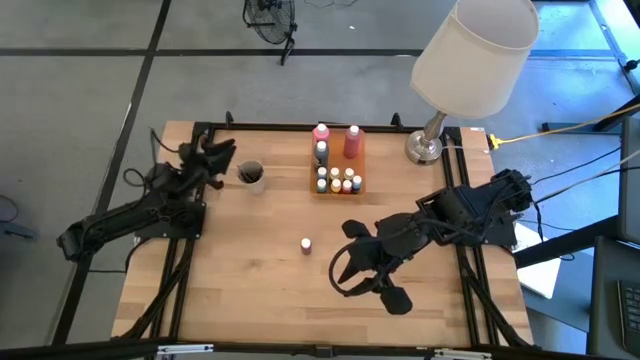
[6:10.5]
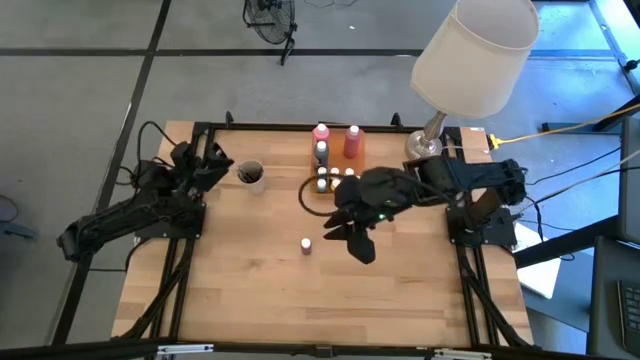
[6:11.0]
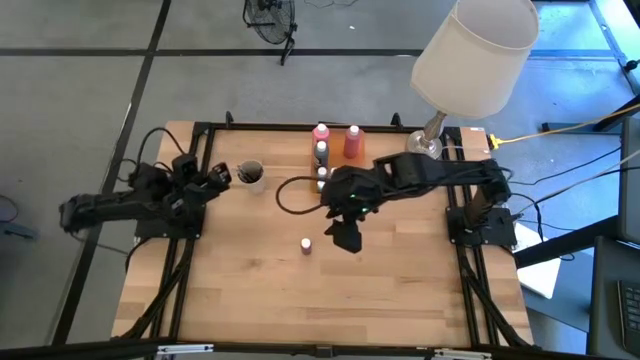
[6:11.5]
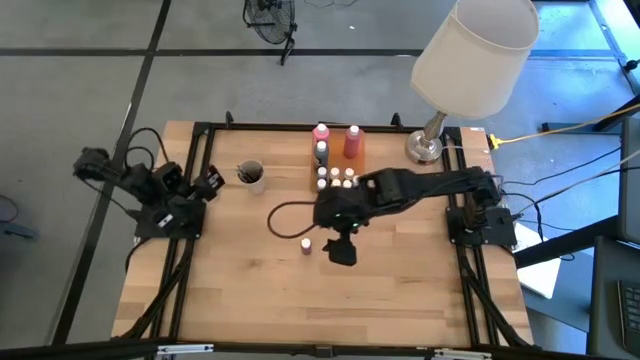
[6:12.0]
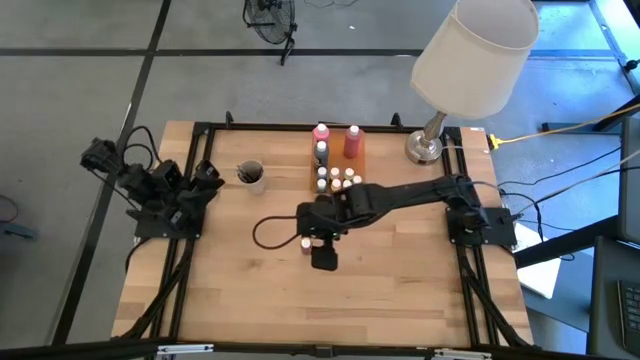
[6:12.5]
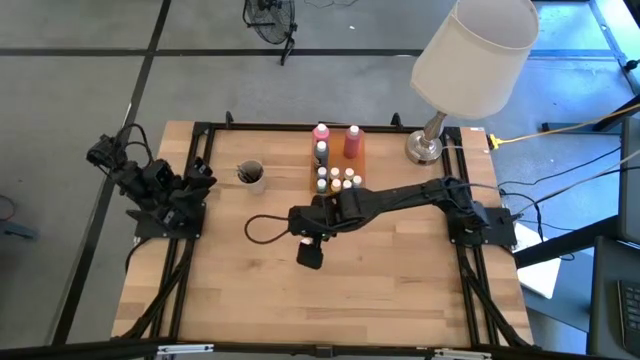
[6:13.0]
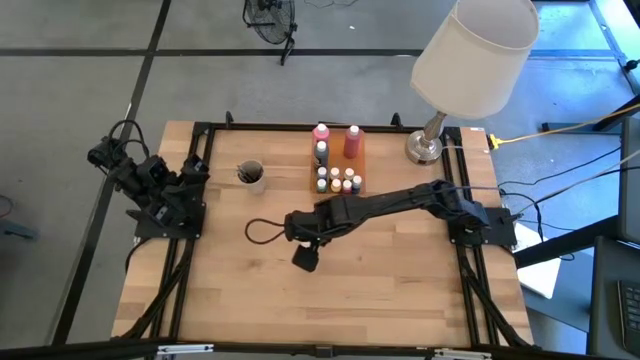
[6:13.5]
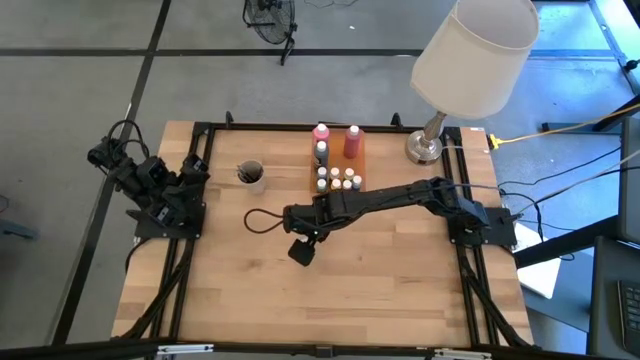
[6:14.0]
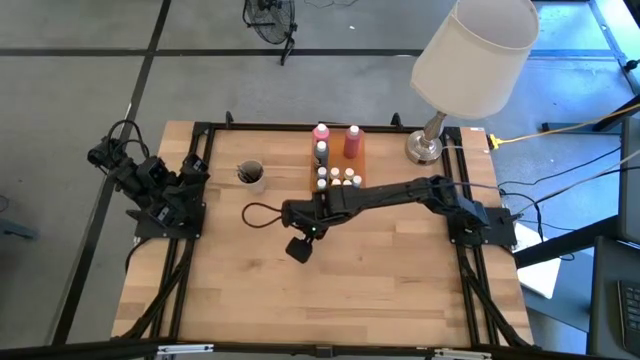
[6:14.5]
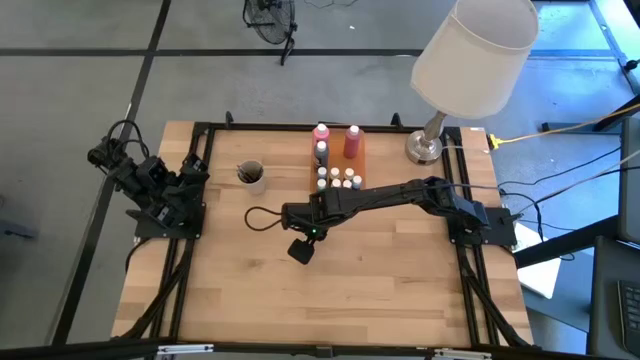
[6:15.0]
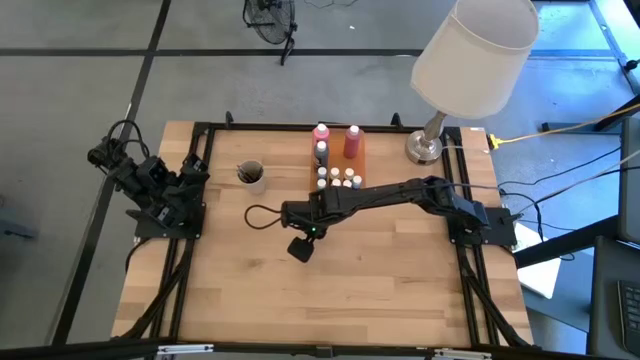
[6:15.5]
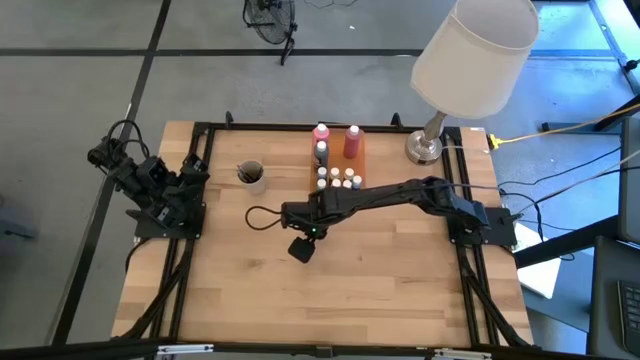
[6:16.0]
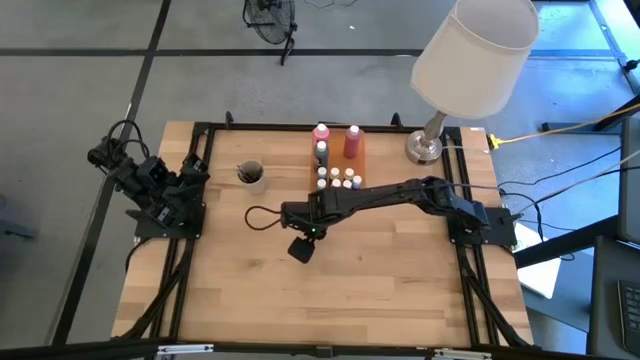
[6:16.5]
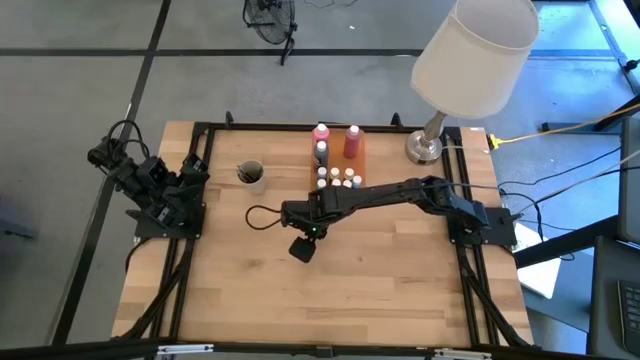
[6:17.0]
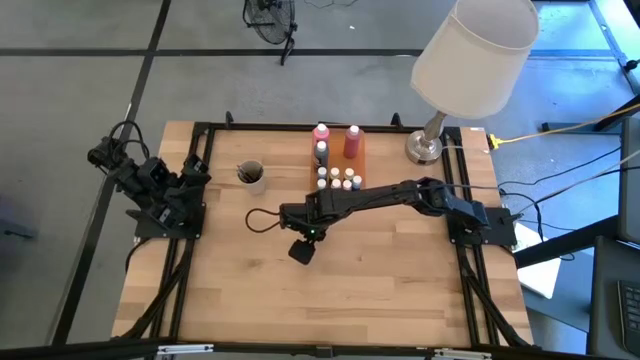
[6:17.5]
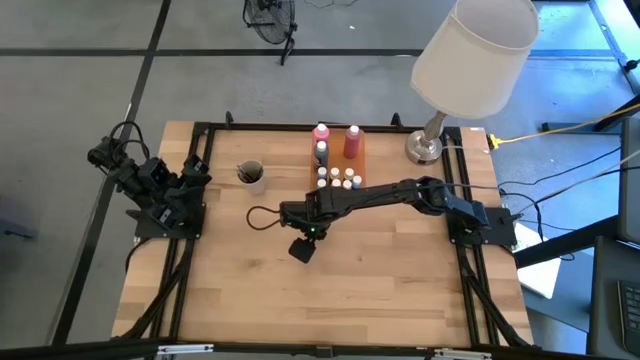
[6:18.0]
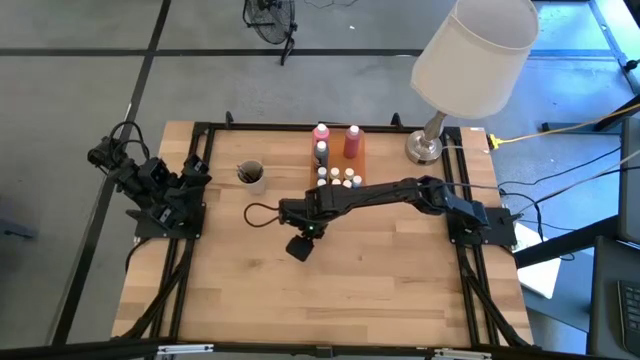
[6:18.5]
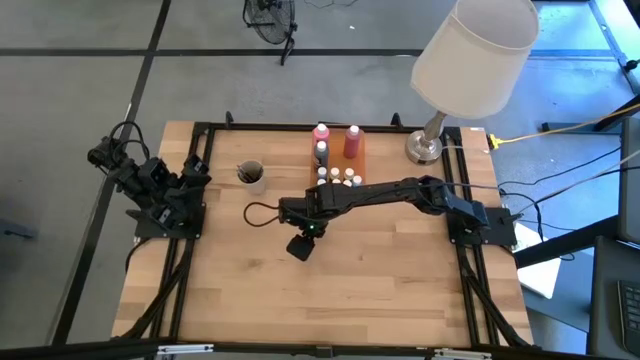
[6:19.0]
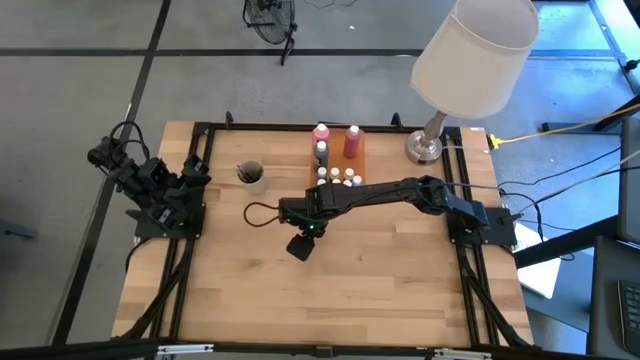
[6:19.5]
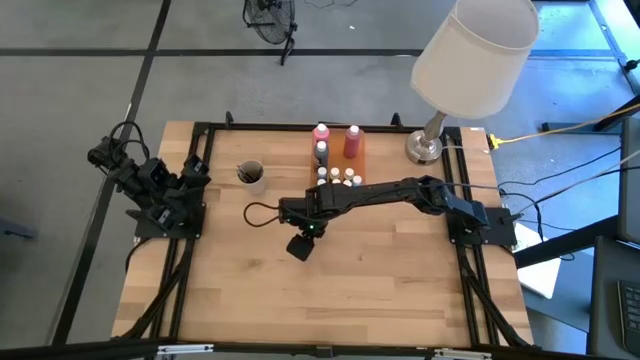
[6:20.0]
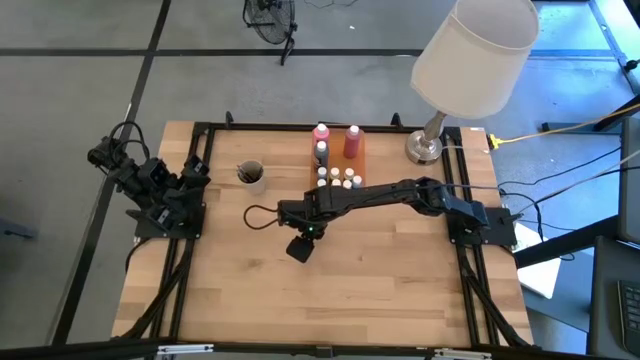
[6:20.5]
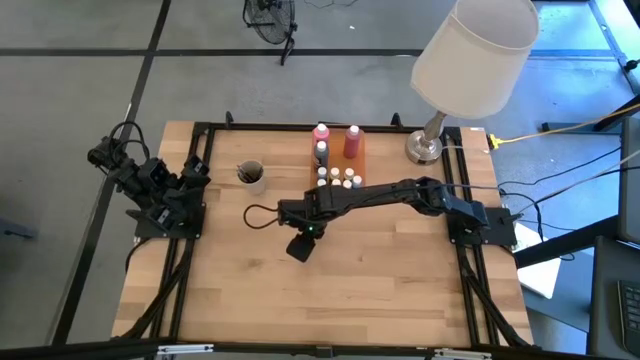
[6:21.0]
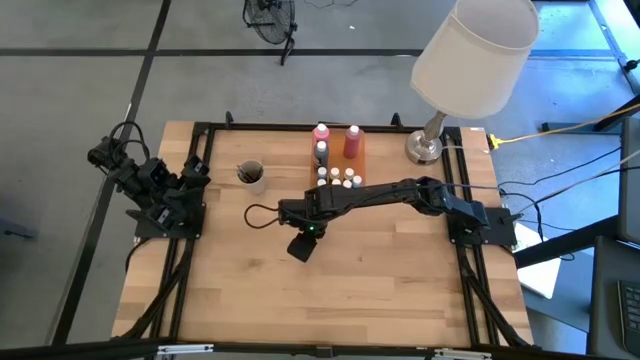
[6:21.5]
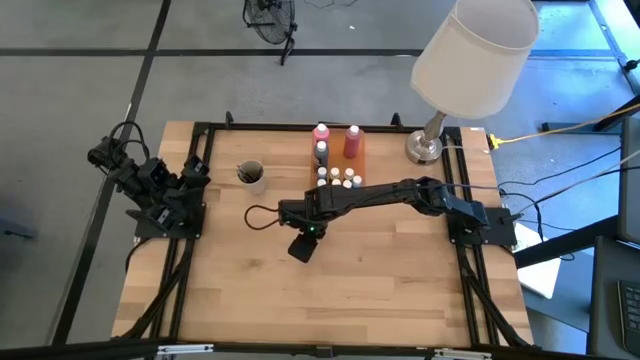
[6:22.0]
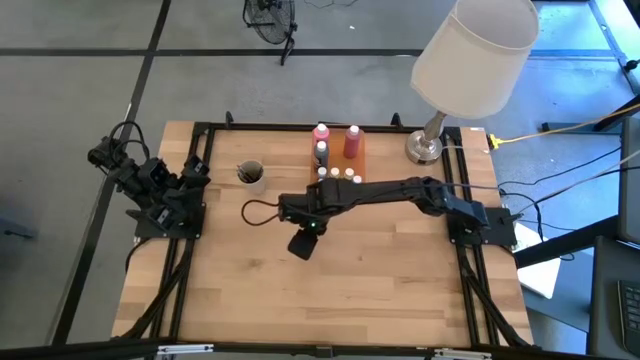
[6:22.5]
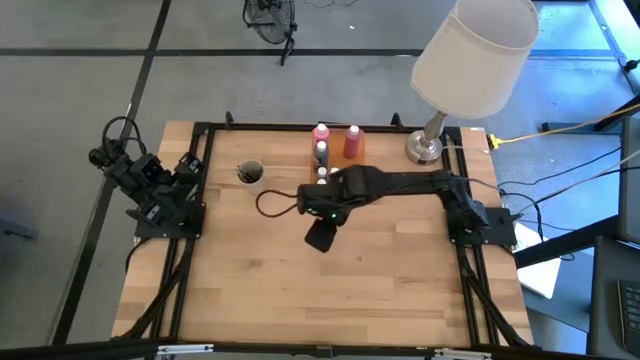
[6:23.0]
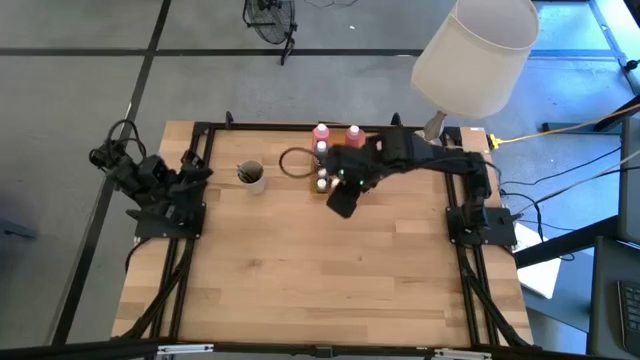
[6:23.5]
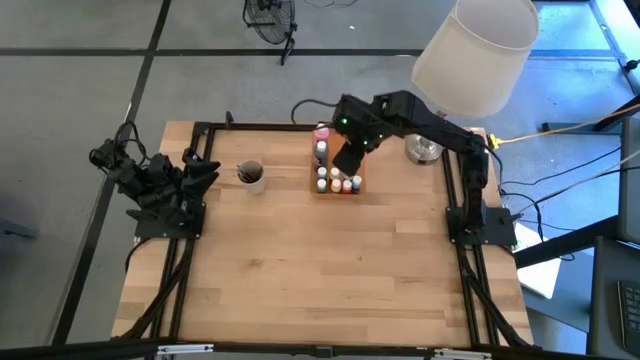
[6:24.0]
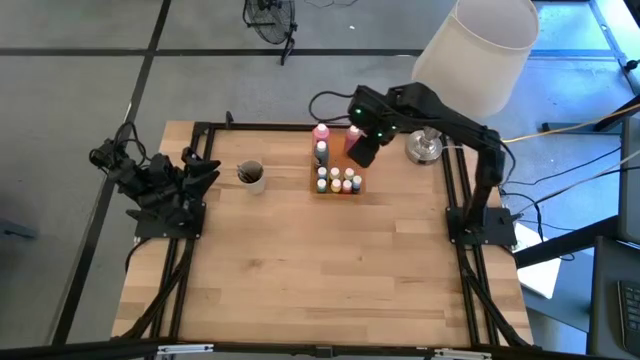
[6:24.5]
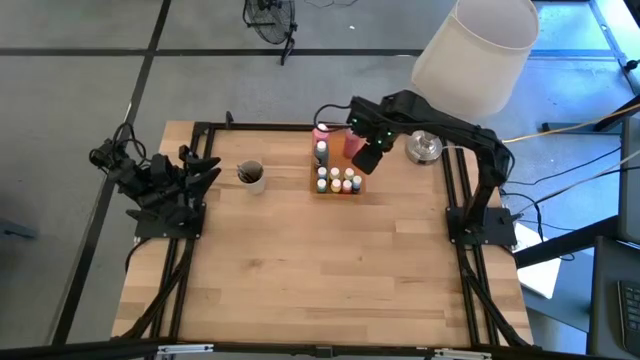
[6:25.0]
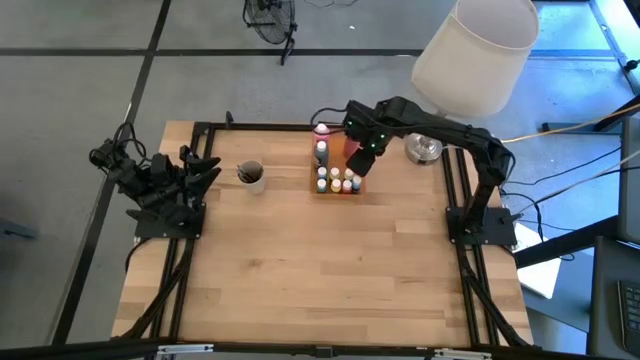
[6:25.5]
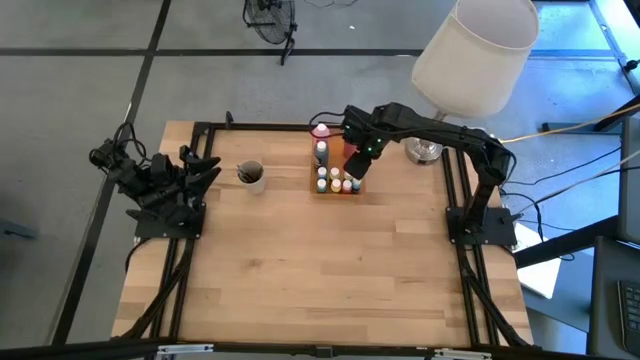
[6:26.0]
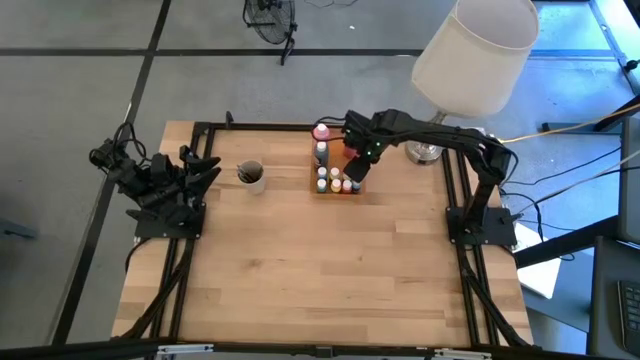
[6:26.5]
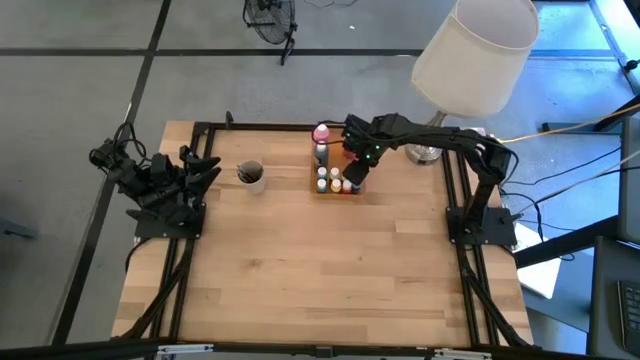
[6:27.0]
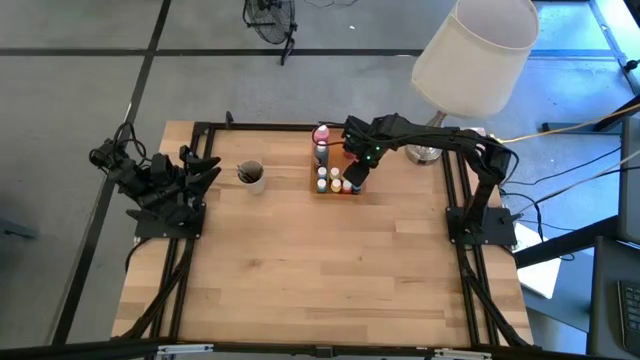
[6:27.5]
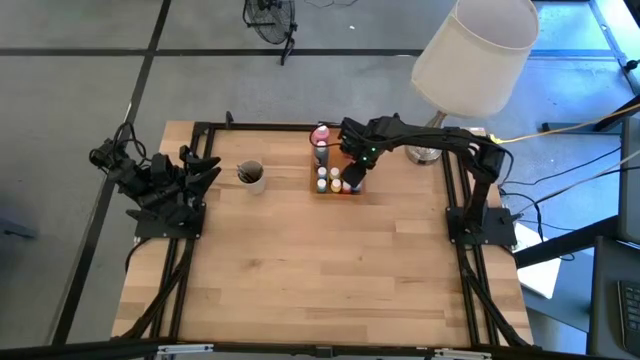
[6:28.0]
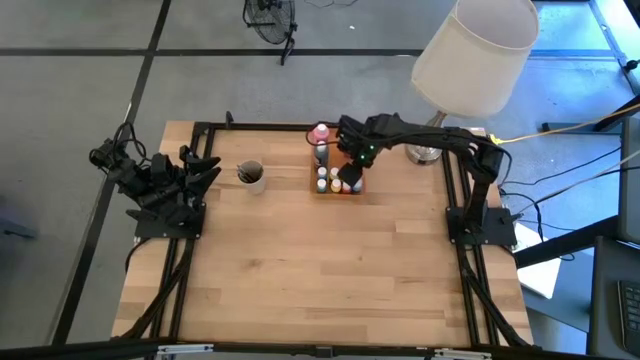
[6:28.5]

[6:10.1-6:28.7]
Task: Pick & Place Paint Supplies
Put the small dark pink paint bottle into the orange bin

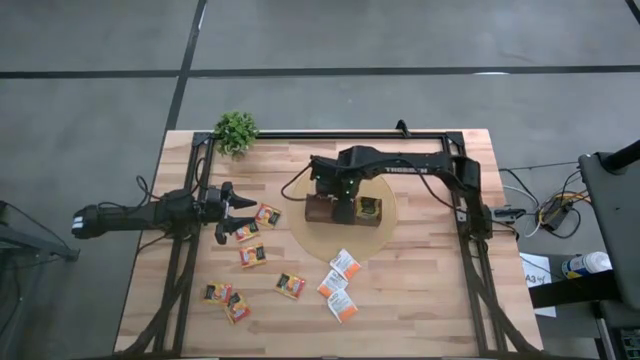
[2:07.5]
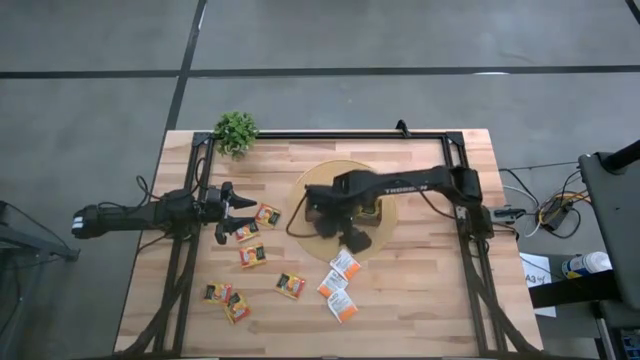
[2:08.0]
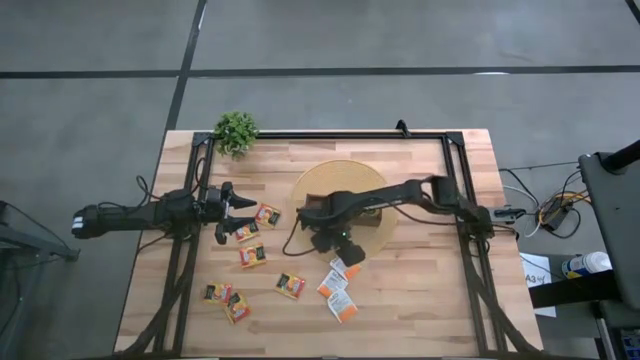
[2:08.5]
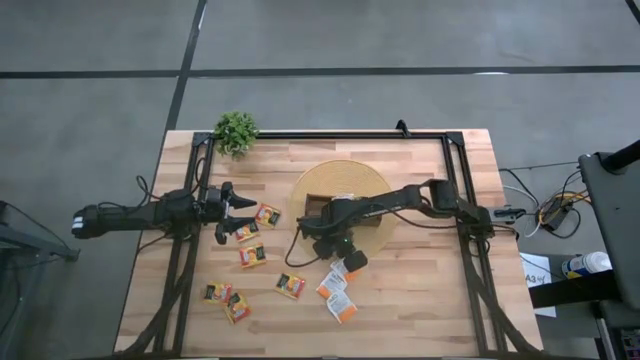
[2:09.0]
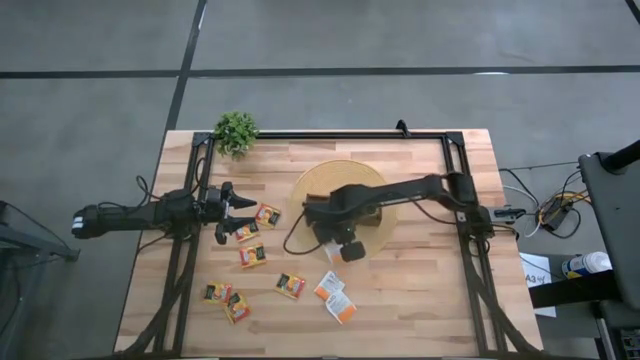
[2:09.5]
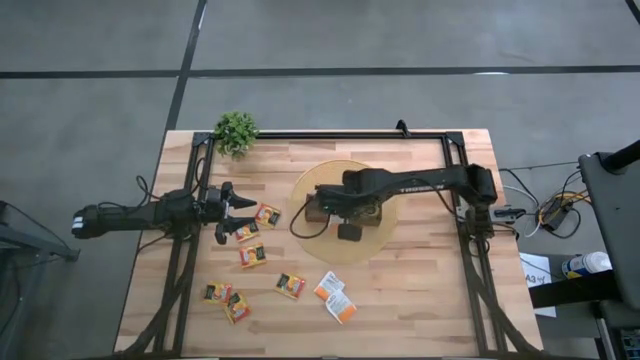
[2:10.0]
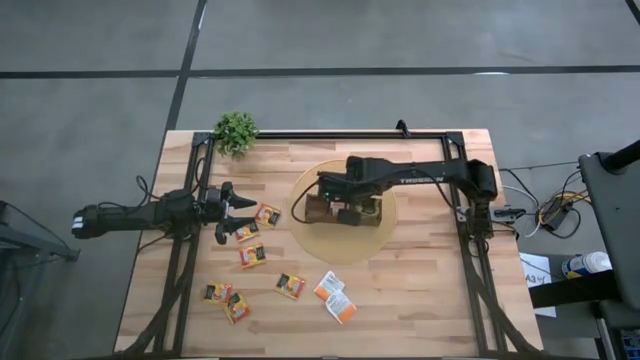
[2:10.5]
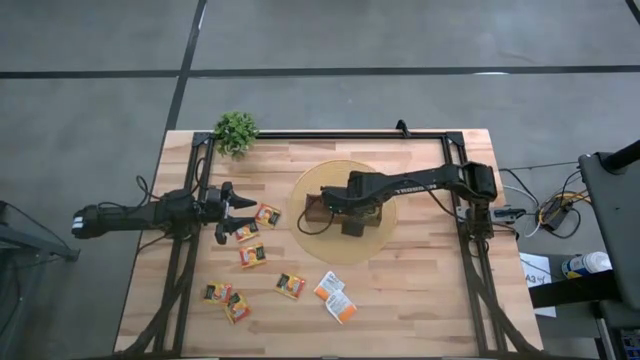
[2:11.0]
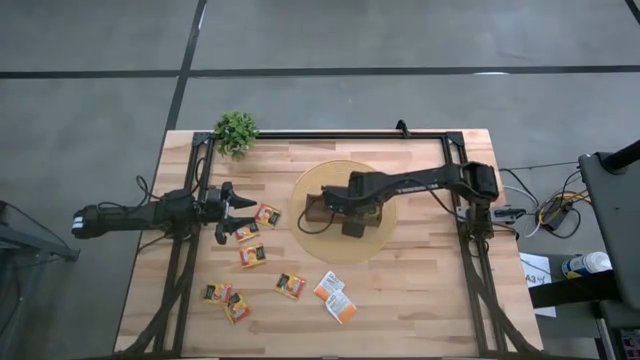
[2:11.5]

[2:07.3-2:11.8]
Task: Pick & Place Tea
Put the white tea bag into the middle section of the wooden organizer
